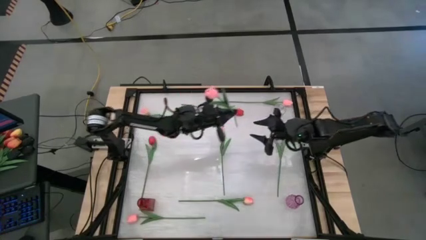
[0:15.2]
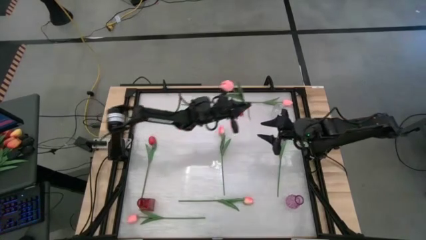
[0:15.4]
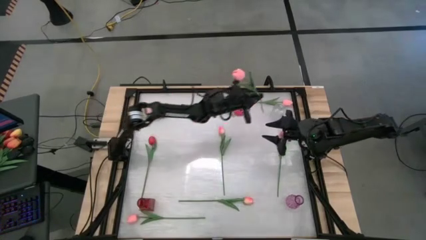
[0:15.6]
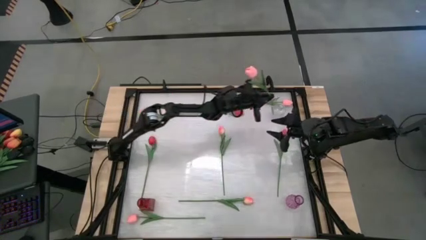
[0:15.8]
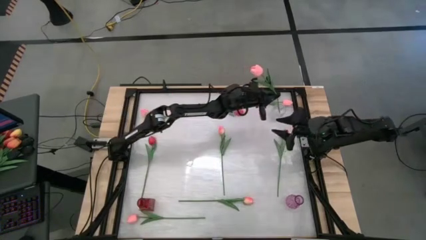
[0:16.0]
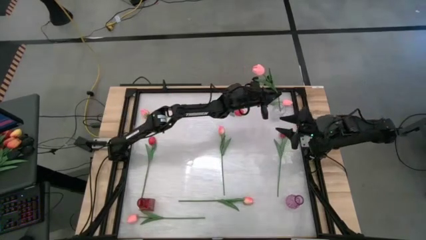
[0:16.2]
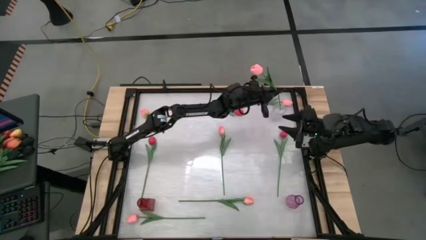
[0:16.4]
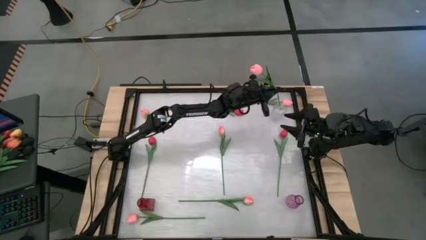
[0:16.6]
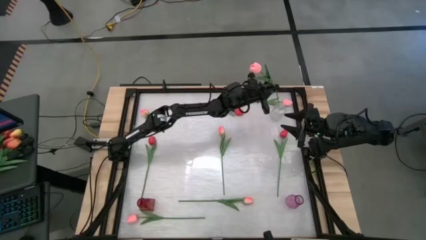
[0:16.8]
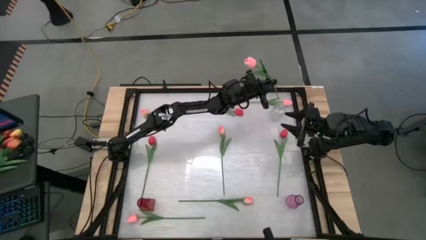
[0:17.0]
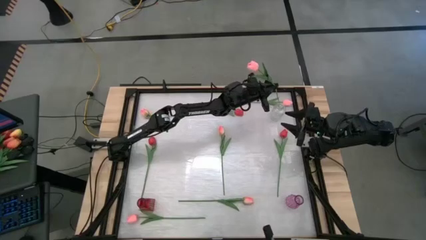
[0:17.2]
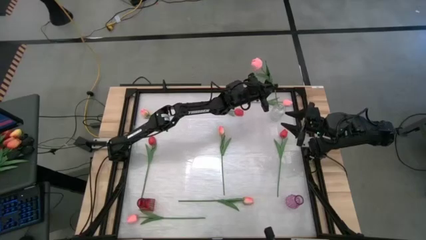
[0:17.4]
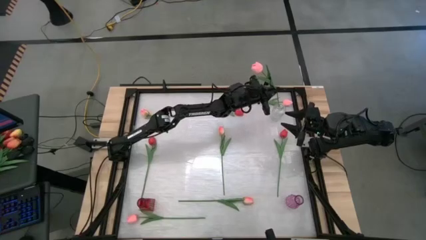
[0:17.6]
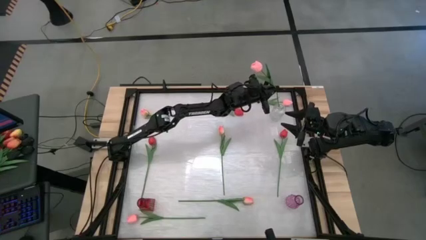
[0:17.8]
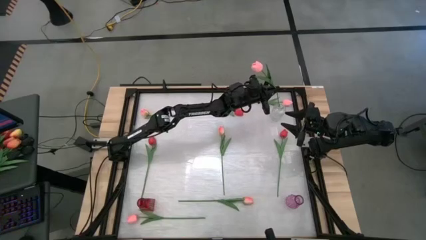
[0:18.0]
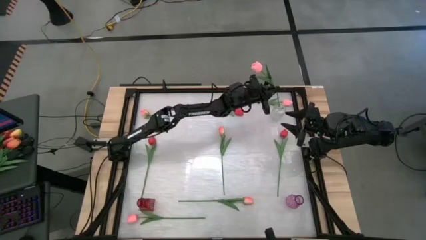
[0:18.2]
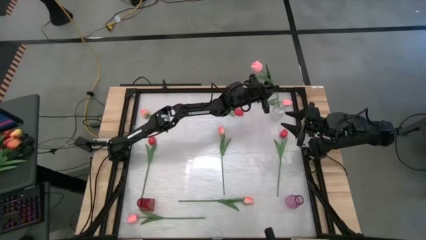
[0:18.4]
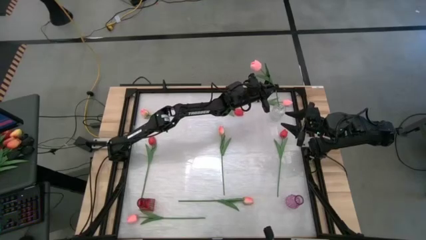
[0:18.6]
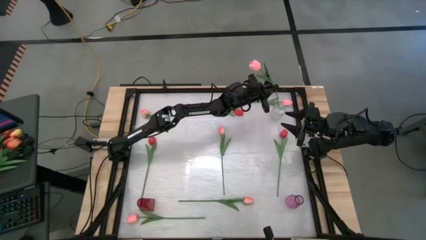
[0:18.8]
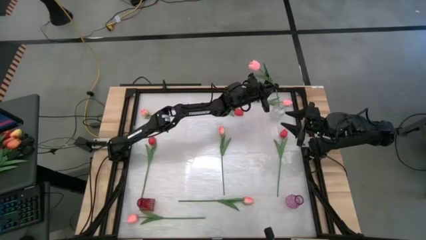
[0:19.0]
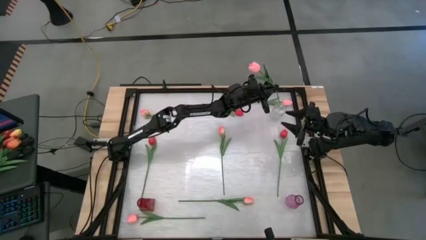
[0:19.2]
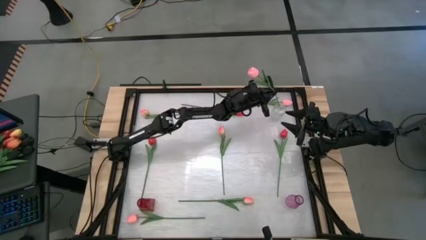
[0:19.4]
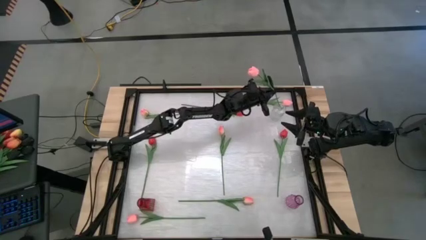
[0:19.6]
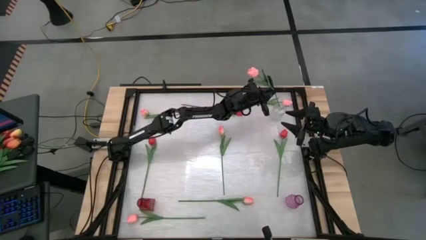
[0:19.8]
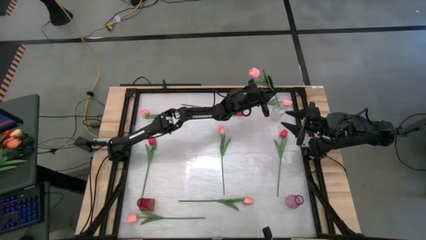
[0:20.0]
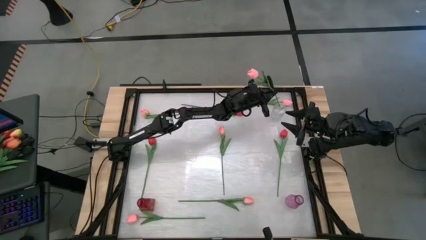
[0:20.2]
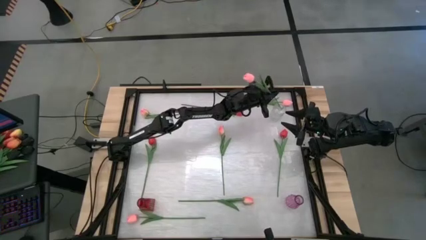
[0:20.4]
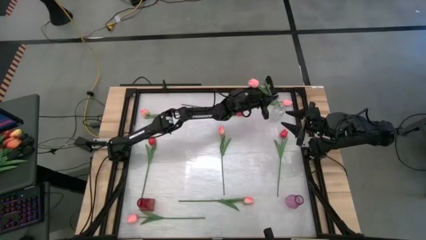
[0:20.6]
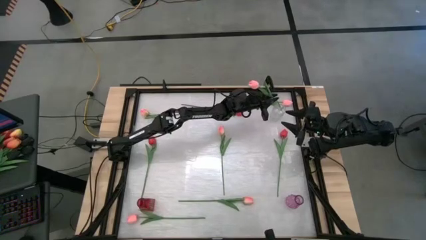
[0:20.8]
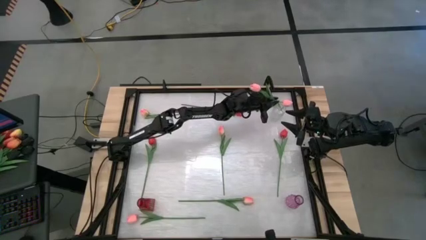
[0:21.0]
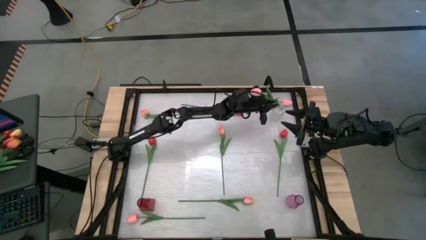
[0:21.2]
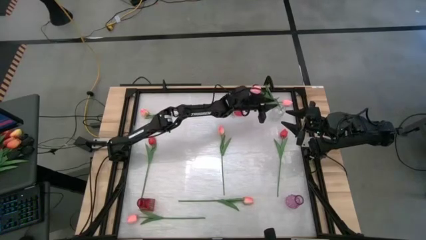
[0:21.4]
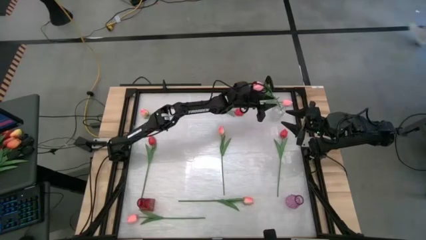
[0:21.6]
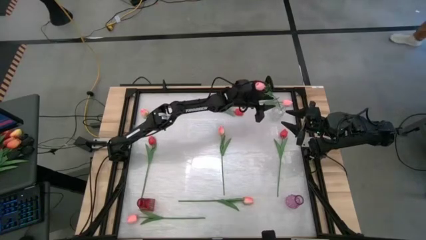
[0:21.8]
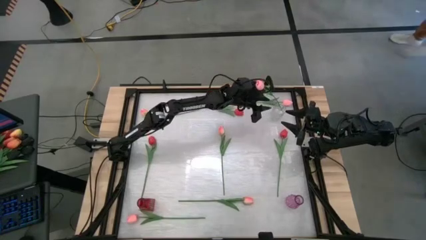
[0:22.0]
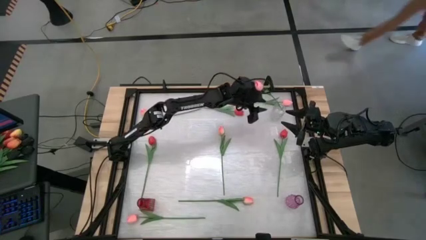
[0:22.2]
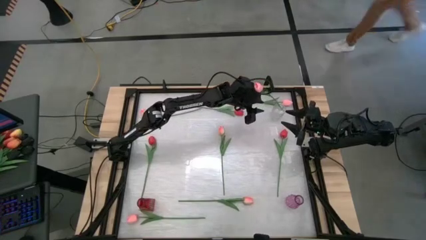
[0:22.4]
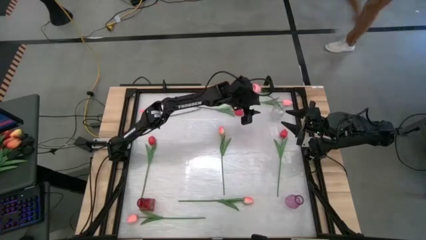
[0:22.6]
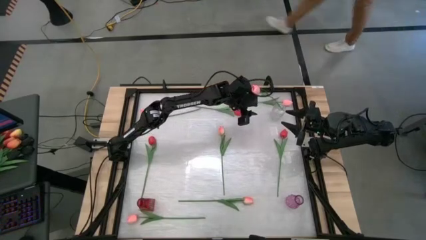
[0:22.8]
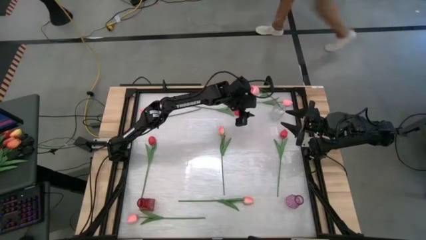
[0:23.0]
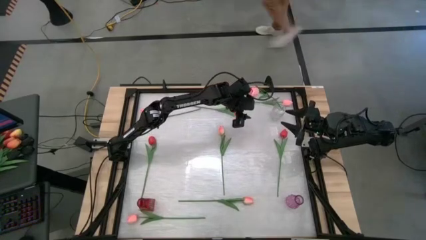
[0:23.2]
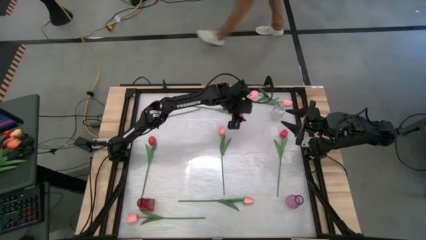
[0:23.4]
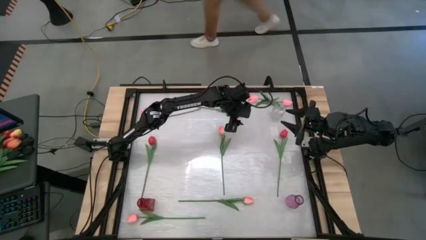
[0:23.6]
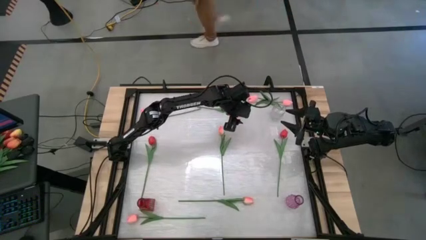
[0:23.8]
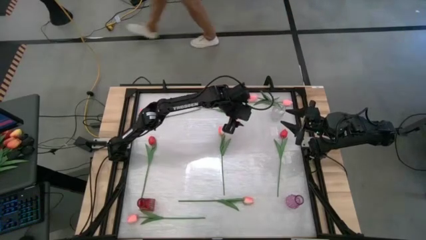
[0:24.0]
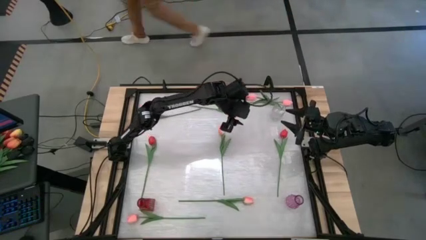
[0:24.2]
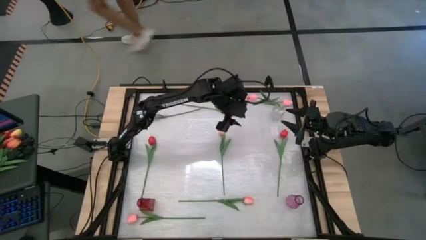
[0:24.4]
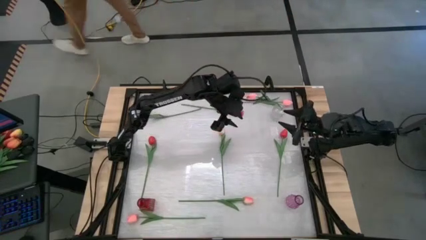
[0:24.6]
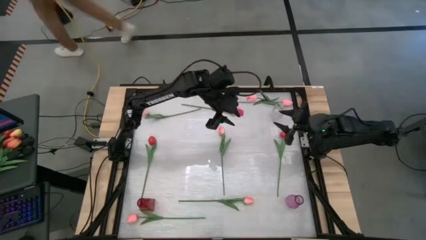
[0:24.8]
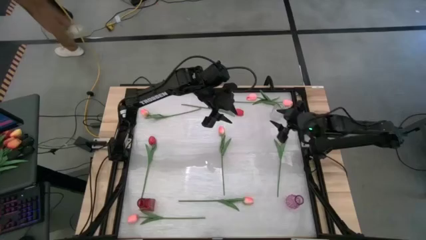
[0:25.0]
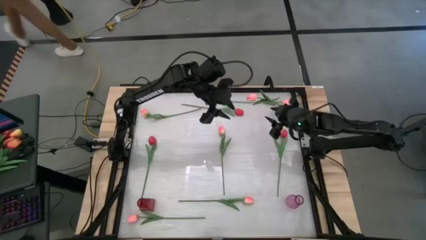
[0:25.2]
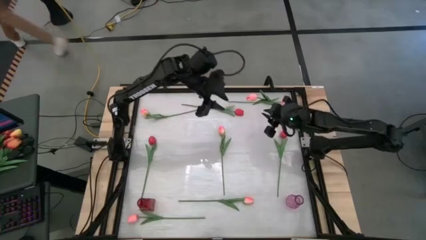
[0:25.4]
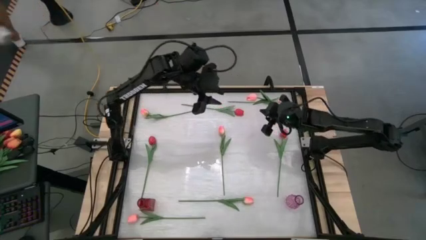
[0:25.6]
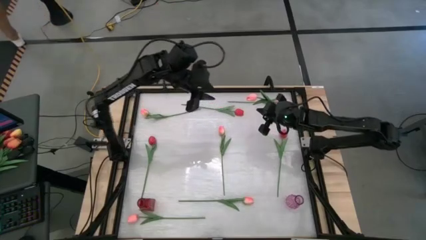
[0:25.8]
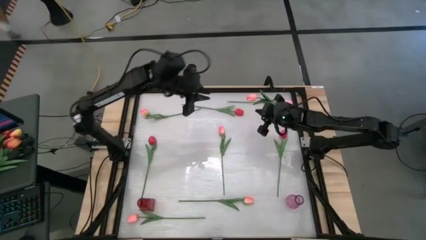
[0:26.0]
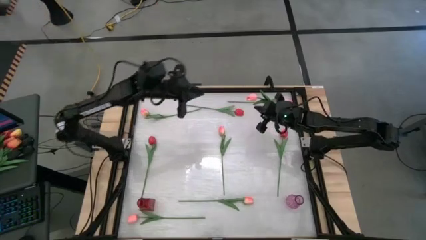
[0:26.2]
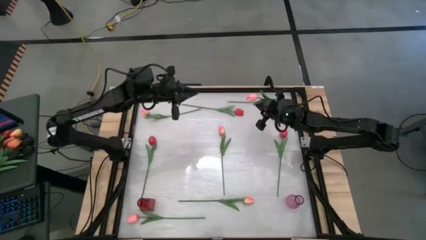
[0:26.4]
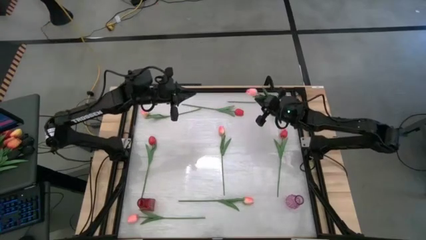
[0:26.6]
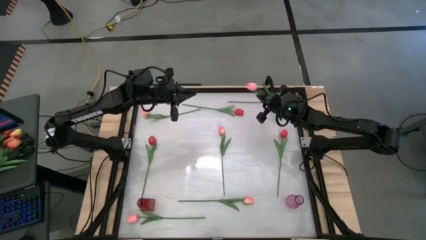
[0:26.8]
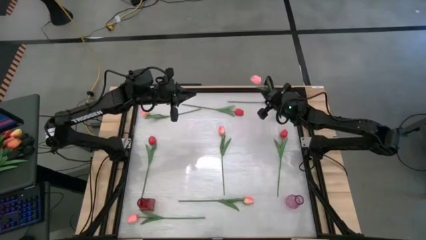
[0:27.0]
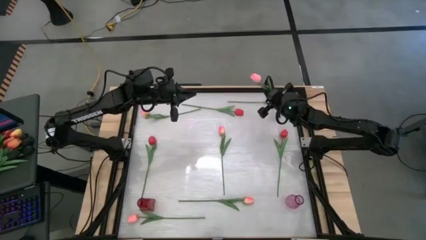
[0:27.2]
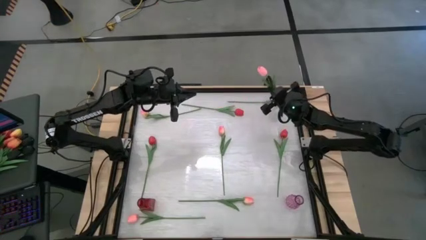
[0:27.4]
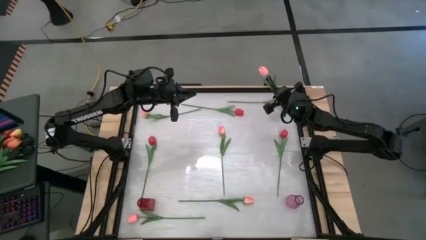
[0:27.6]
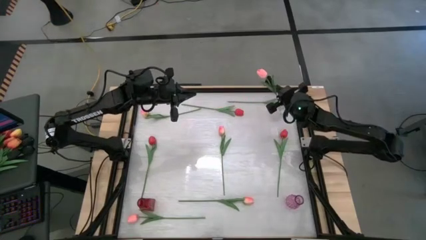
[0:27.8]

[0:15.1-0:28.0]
Task: Sort flowers into vase by color
Put the pink flower in the transparent vase
